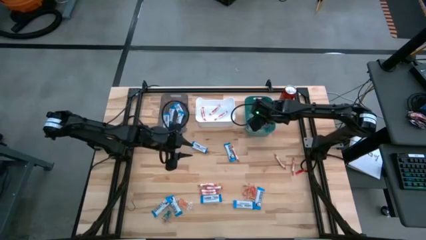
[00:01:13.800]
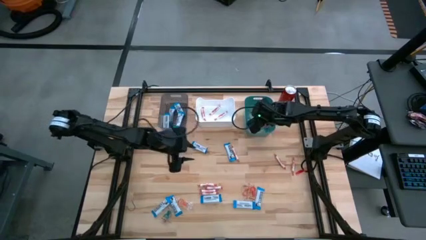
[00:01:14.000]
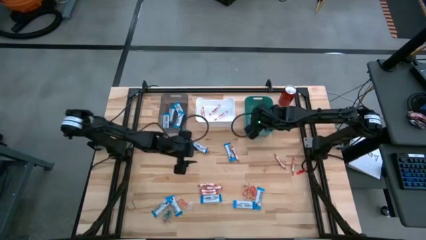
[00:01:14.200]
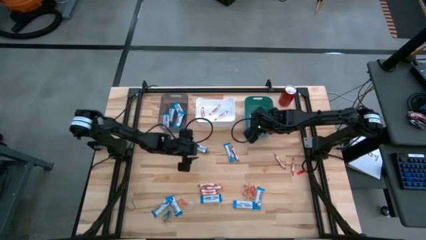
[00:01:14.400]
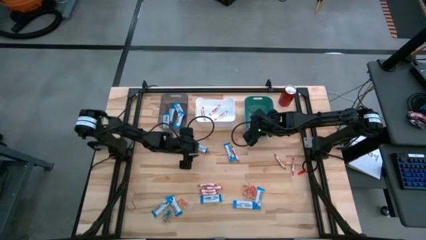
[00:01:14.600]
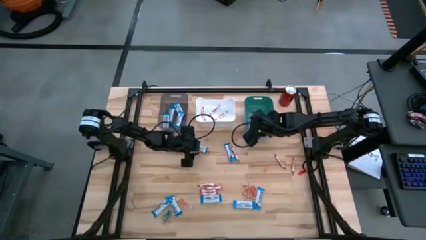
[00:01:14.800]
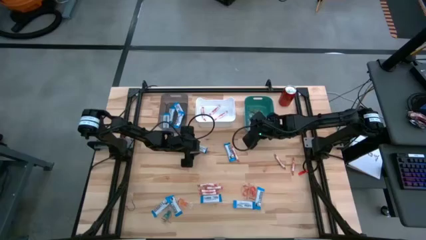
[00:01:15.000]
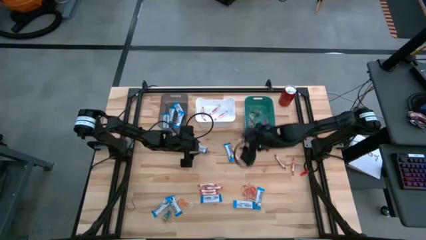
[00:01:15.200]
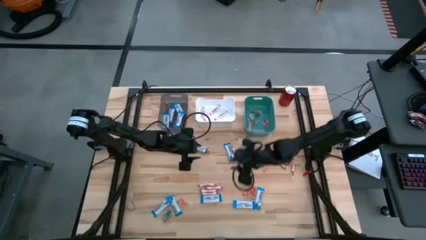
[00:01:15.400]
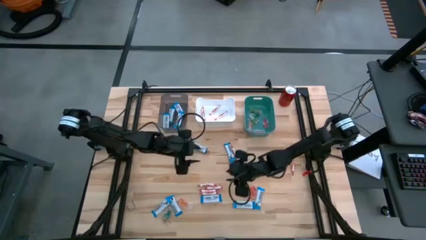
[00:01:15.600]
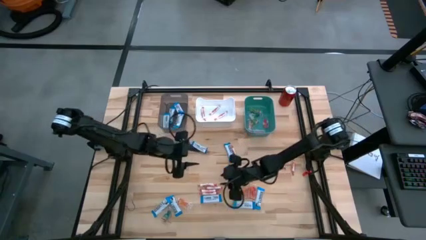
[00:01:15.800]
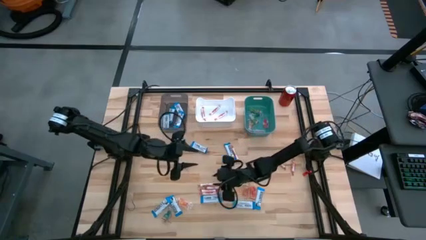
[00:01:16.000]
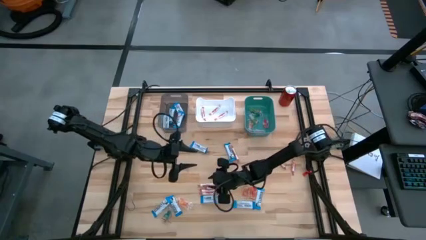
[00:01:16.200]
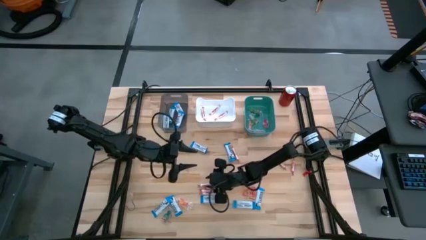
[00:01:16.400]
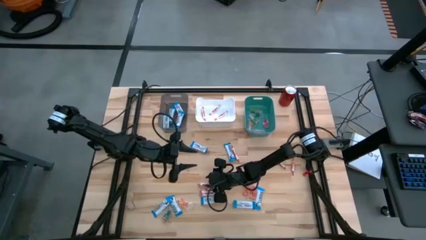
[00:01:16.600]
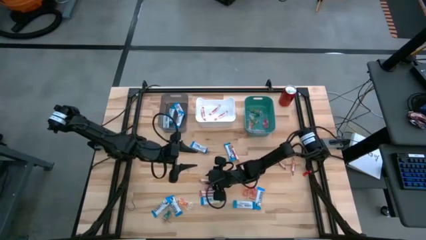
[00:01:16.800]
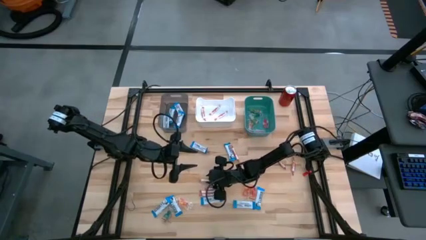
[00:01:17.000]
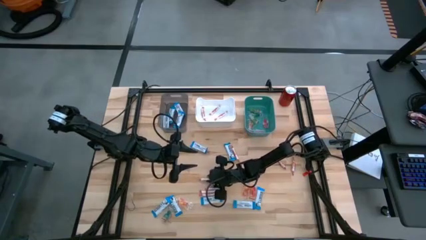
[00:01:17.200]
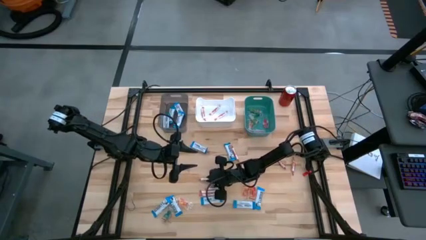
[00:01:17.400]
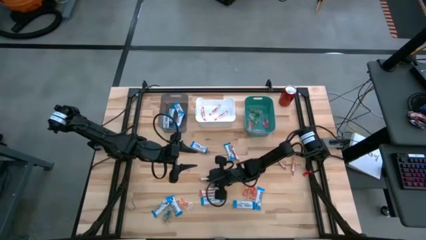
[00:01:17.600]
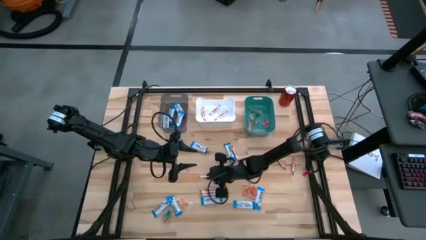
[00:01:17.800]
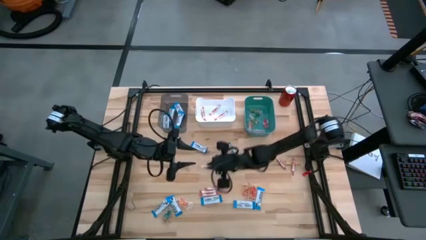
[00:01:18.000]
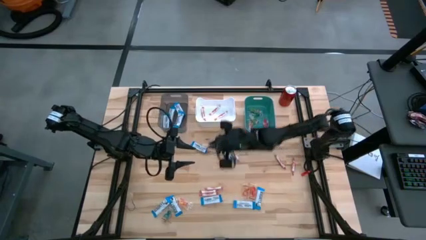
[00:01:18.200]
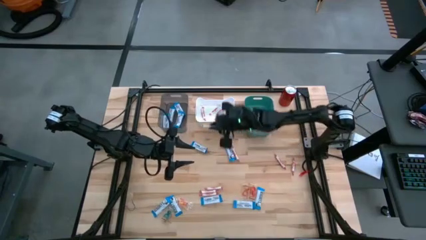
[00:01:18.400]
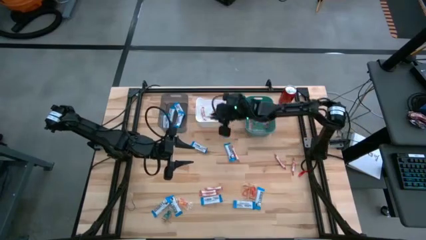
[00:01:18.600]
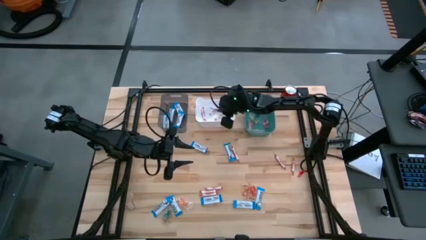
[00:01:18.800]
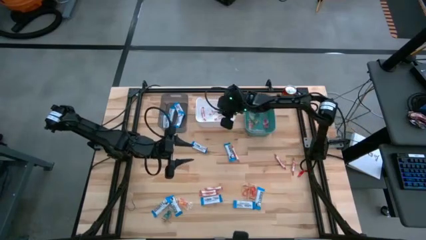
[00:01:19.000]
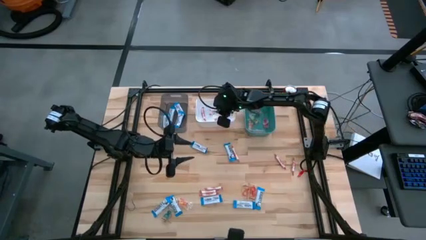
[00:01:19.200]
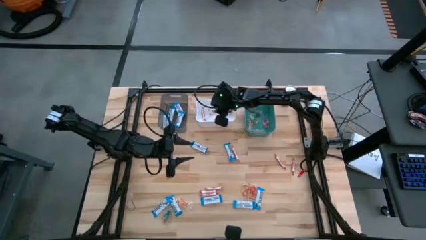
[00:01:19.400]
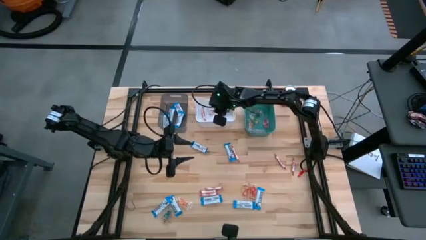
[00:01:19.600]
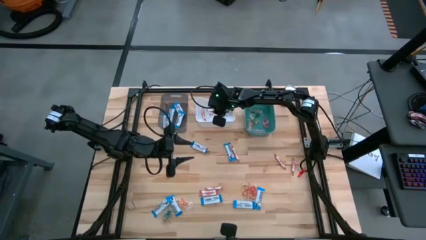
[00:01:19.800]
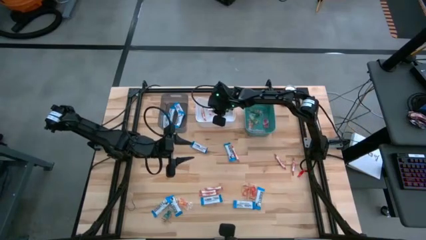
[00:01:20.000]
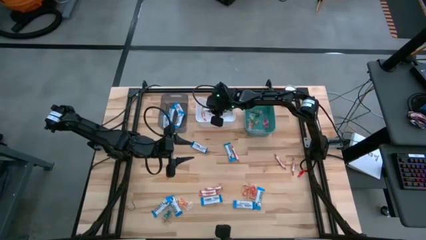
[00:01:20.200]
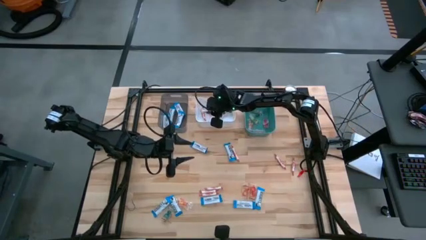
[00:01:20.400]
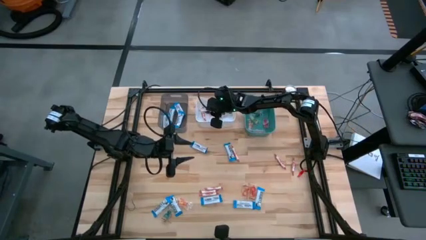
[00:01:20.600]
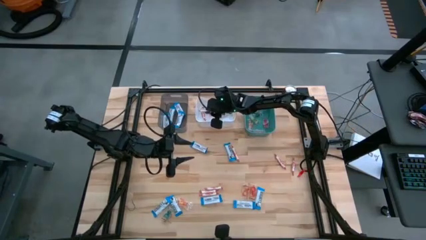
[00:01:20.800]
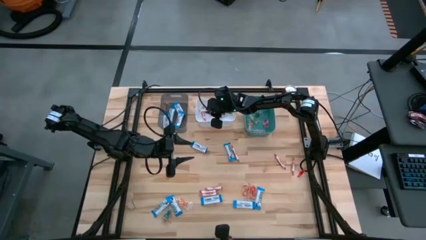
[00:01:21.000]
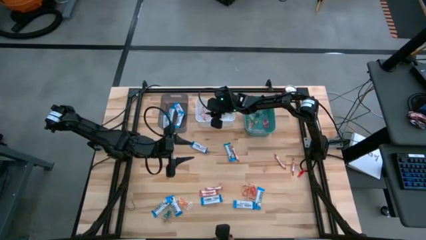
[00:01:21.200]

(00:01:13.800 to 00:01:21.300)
Task: Sort candy
Put the orange candy into the white bin

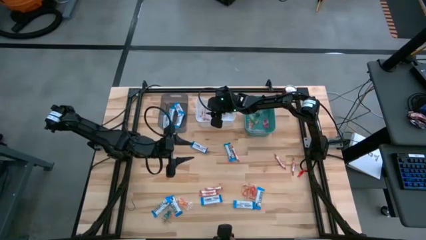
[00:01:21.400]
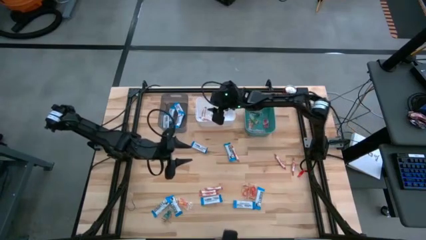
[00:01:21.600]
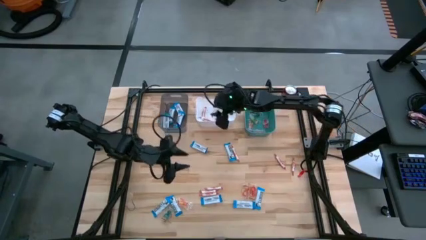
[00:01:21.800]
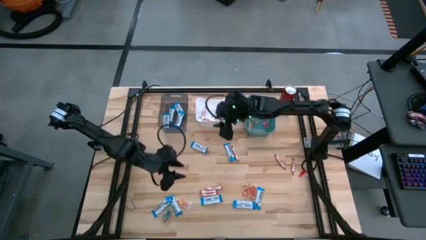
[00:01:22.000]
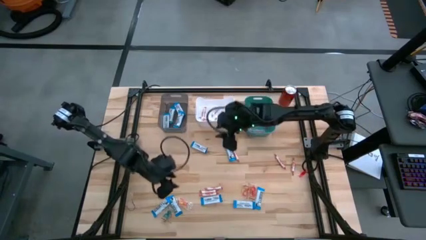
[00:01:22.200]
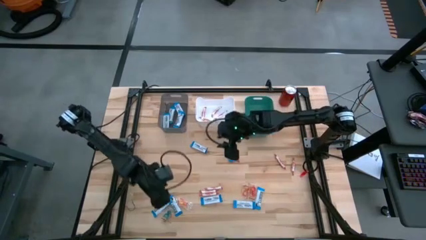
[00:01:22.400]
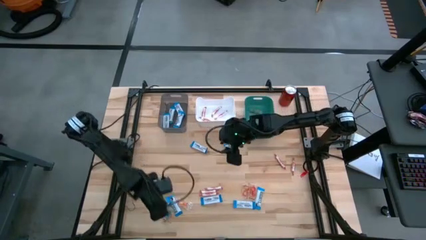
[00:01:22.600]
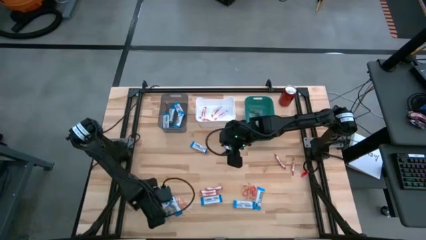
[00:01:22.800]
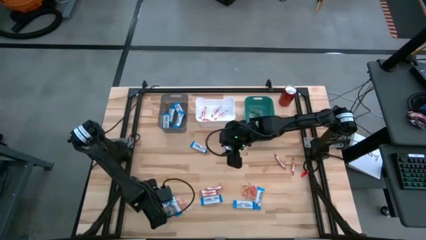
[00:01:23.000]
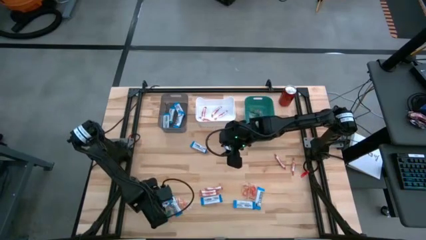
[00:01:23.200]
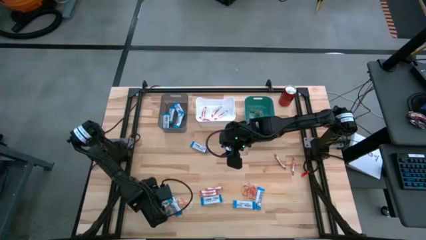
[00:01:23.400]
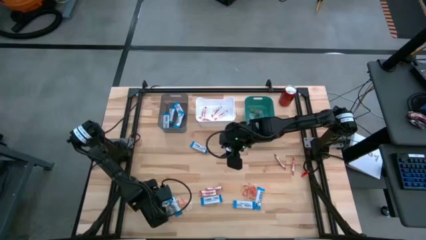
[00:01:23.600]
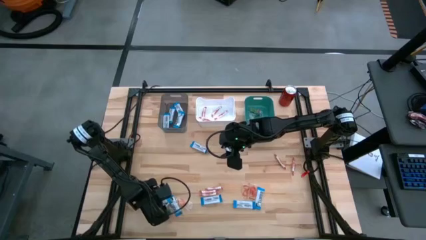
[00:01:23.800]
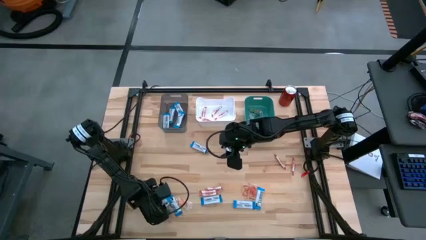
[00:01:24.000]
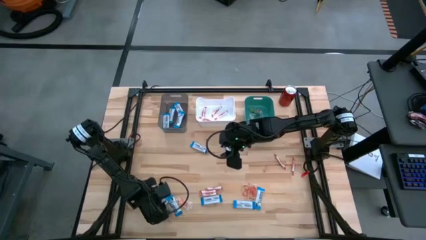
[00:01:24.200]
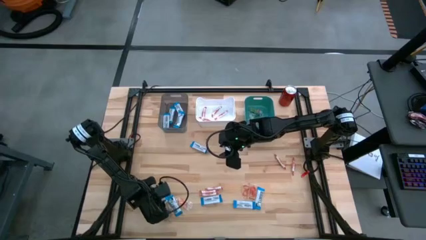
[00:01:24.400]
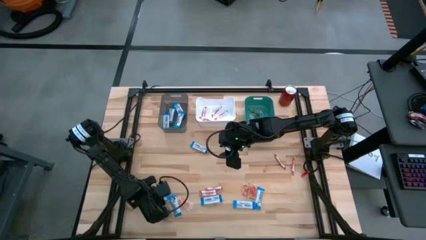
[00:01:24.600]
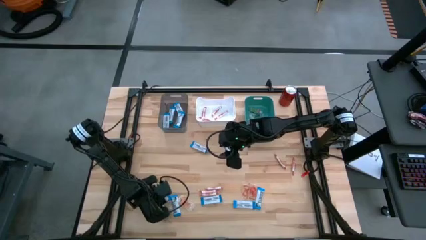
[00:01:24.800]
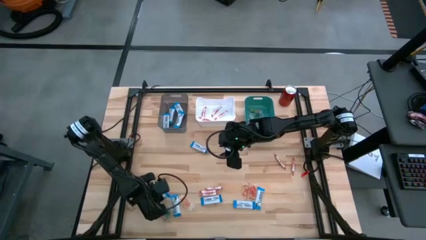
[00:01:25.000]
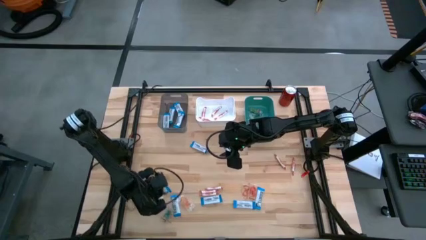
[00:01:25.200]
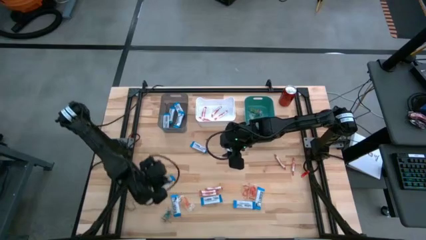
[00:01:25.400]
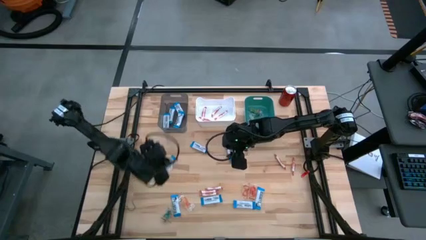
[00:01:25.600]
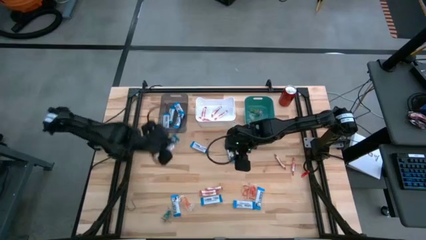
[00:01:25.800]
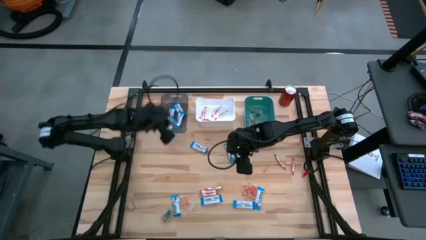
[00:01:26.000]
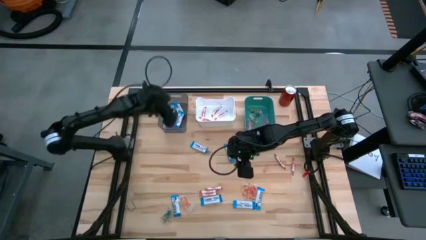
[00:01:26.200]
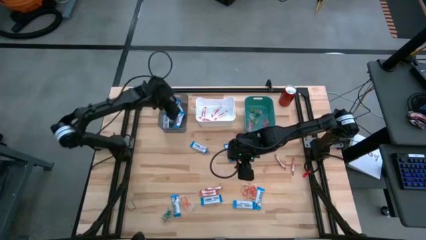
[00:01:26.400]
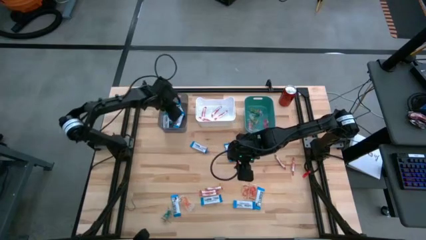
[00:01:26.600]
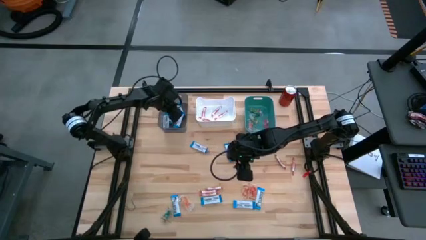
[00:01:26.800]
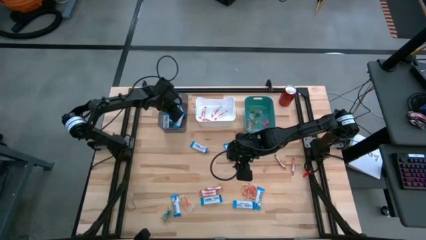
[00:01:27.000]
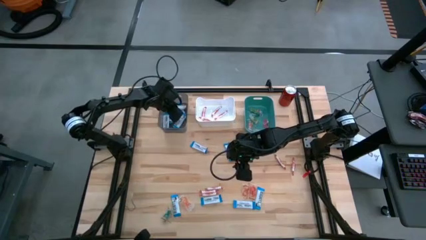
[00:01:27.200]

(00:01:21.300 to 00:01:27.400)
Put the white chocolate into the gray bin

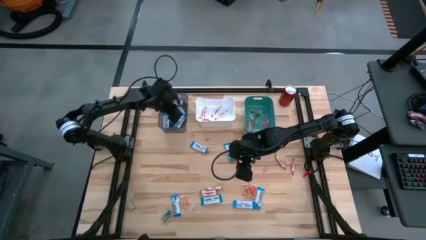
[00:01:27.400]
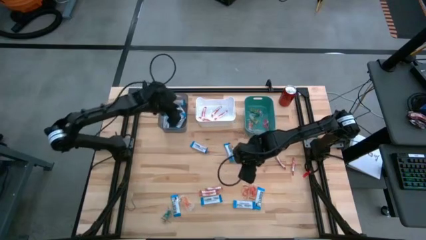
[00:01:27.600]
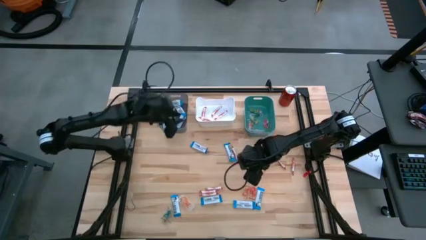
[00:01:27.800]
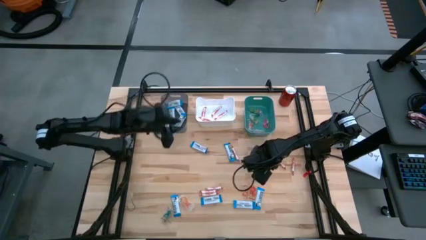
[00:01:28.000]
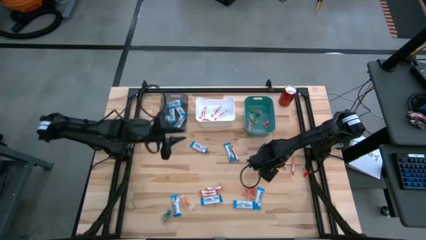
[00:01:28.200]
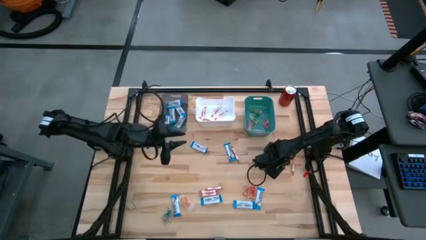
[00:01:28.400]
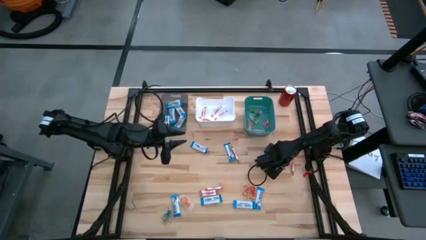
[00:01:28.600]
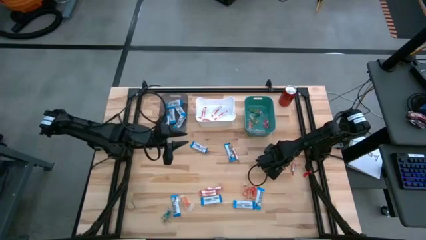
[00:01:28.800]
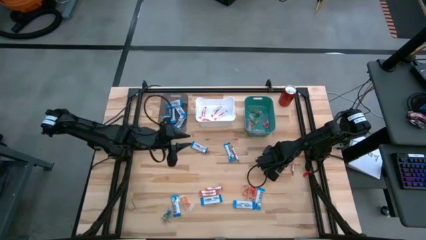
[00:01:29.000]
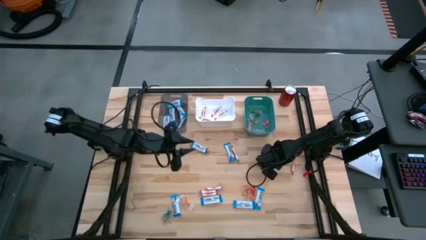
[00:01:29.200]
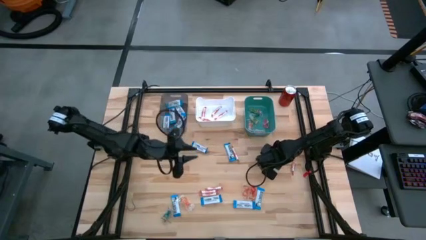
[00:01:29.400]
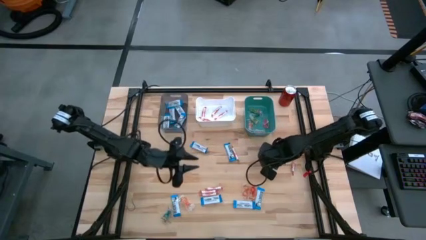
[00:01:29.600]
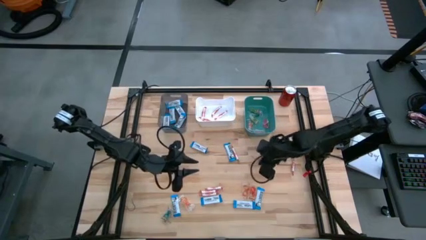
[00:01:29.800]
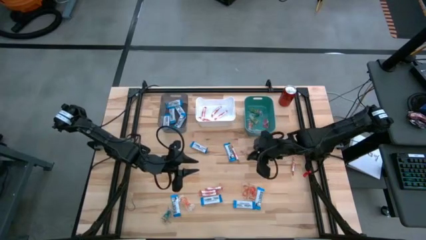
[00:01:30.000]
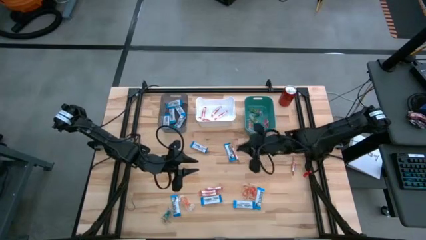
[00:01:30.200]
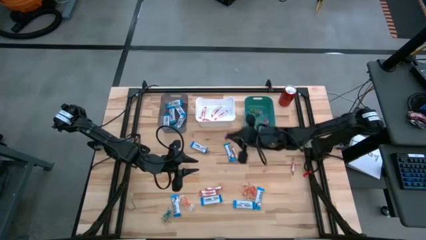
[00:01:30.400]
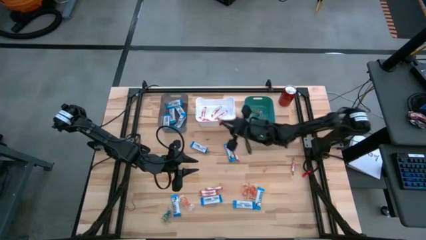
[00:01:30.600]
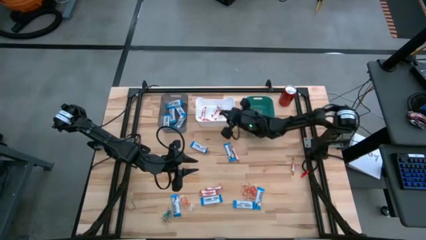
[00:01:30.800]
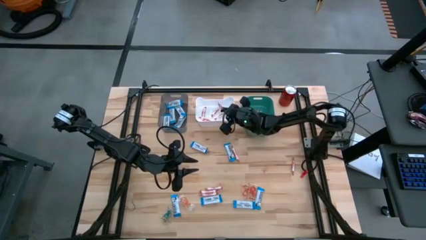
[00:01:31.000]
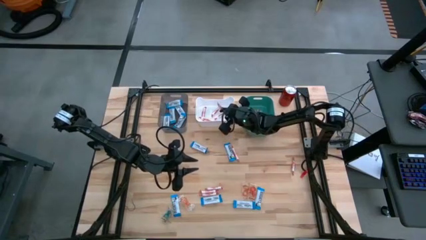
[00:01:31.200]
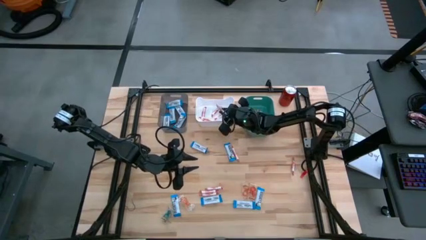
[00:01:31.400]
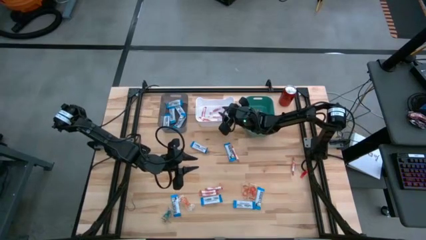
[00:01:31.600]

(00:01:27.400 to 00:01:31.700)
Put the orange candy into the white bin
